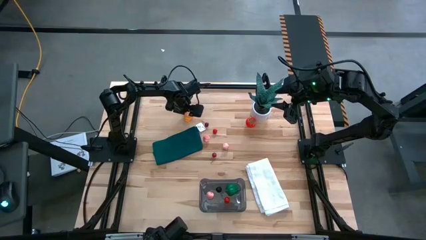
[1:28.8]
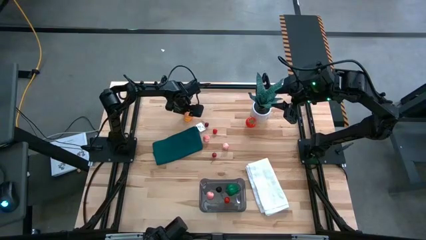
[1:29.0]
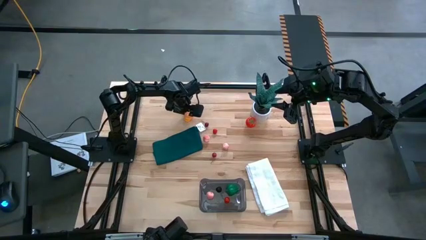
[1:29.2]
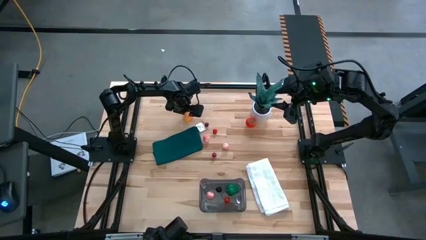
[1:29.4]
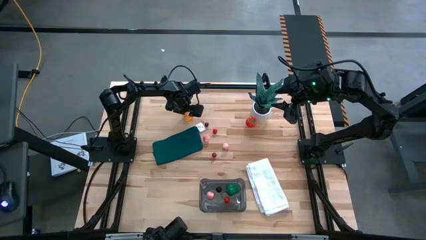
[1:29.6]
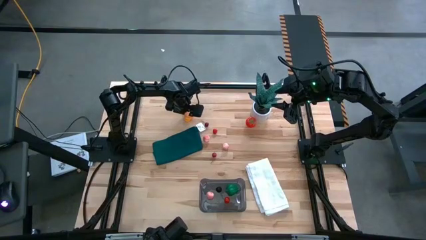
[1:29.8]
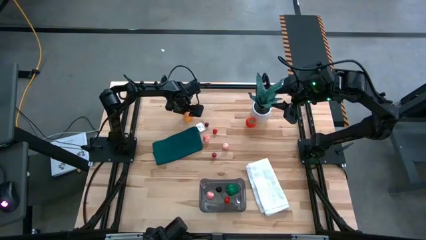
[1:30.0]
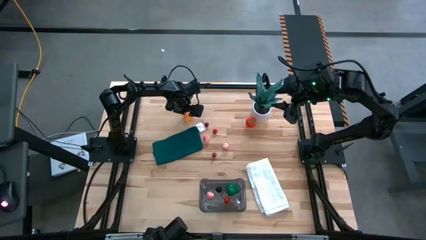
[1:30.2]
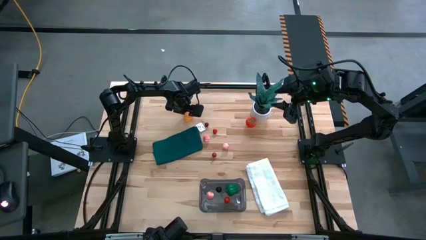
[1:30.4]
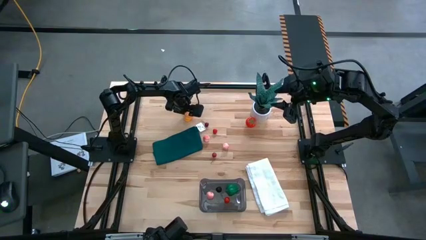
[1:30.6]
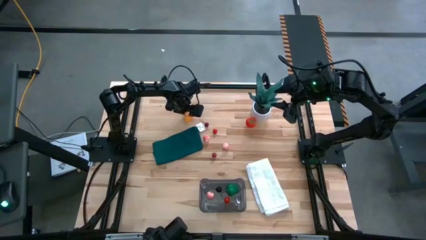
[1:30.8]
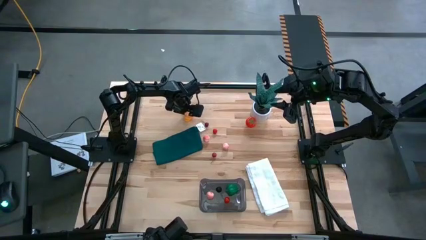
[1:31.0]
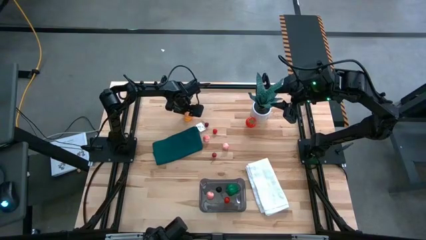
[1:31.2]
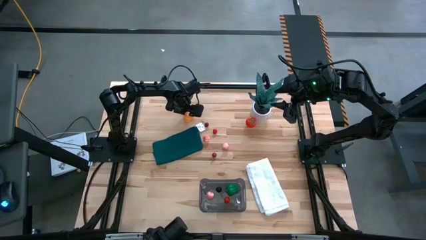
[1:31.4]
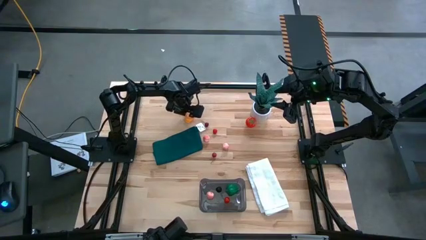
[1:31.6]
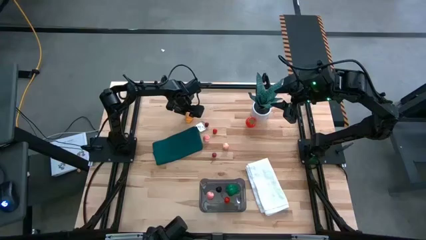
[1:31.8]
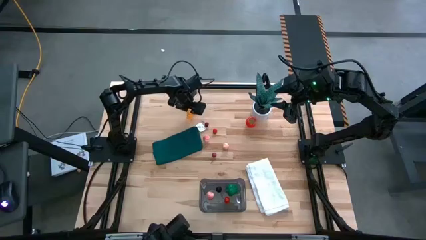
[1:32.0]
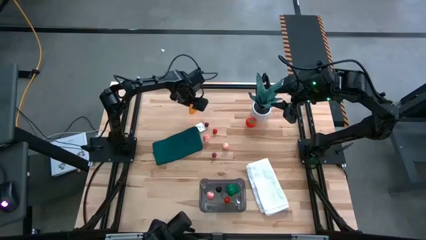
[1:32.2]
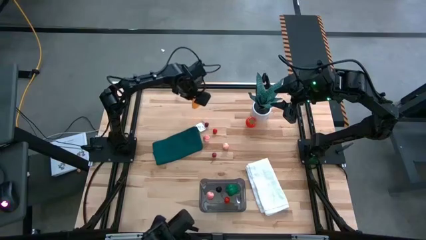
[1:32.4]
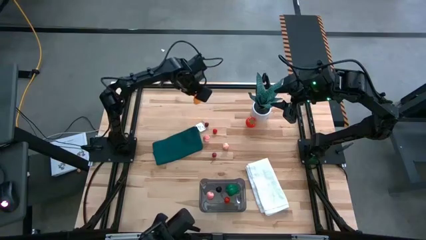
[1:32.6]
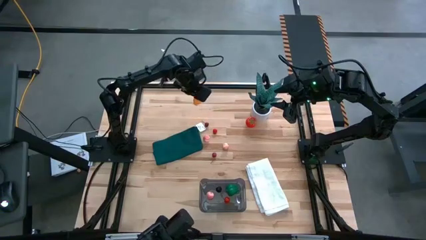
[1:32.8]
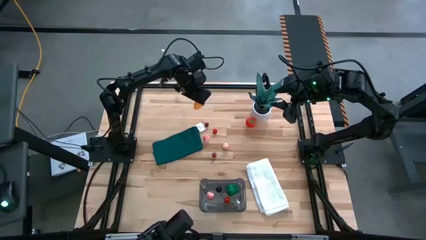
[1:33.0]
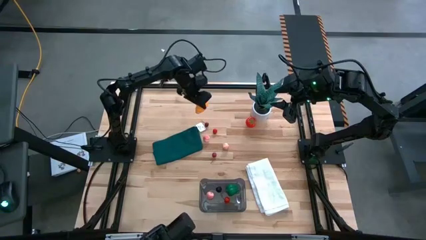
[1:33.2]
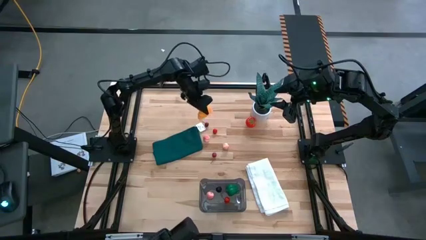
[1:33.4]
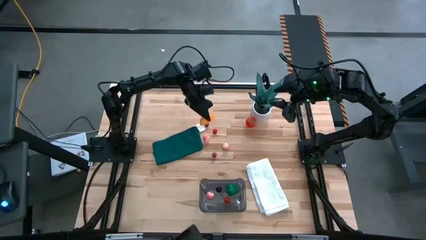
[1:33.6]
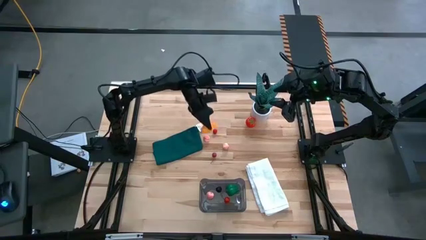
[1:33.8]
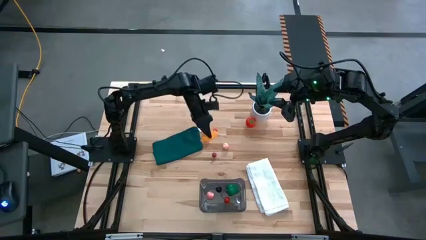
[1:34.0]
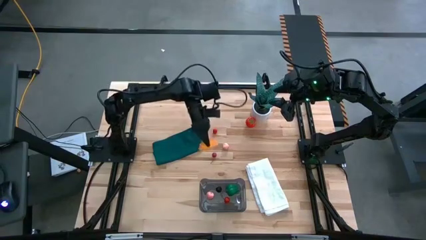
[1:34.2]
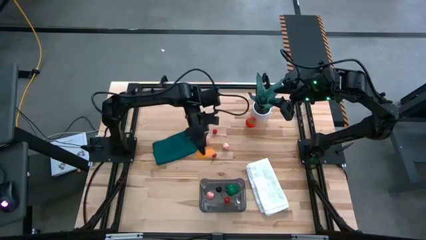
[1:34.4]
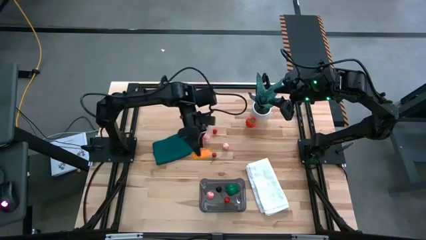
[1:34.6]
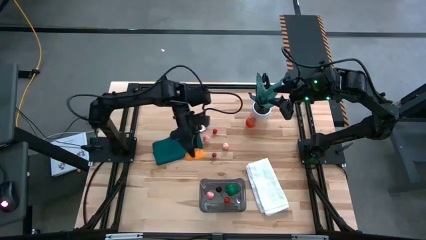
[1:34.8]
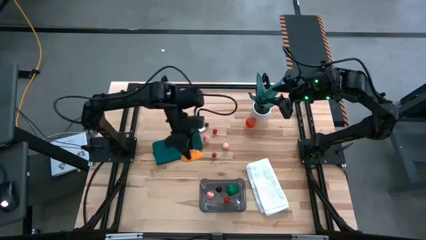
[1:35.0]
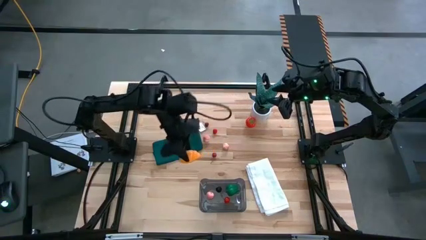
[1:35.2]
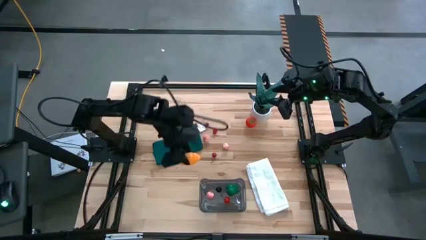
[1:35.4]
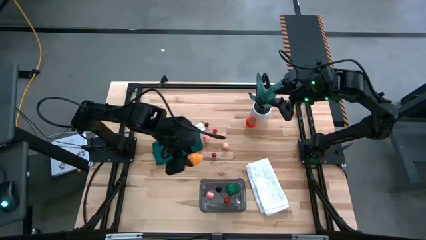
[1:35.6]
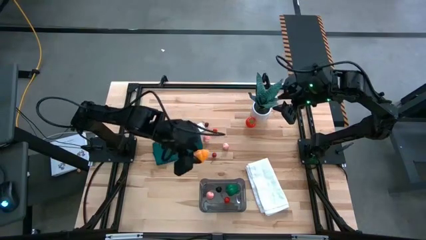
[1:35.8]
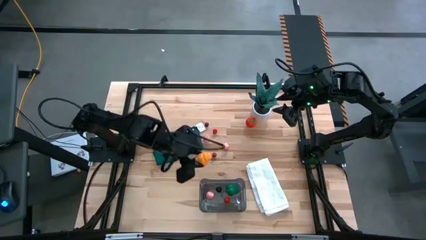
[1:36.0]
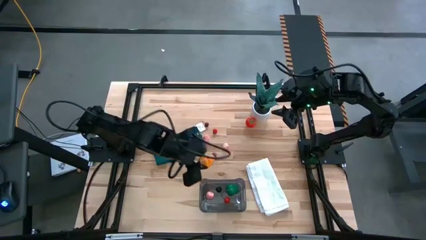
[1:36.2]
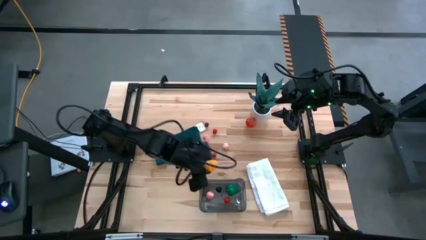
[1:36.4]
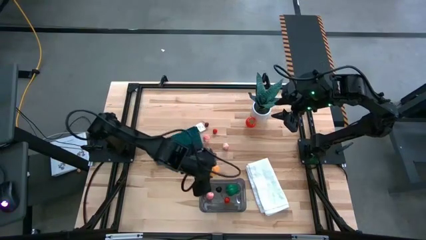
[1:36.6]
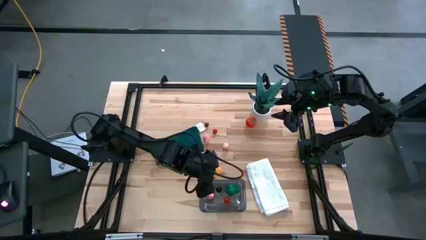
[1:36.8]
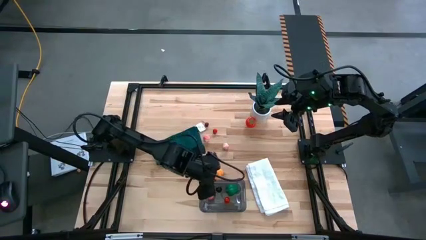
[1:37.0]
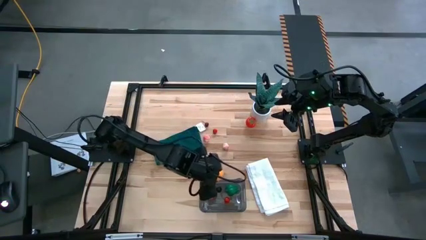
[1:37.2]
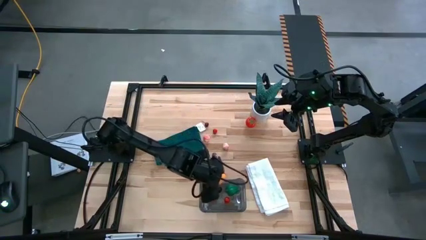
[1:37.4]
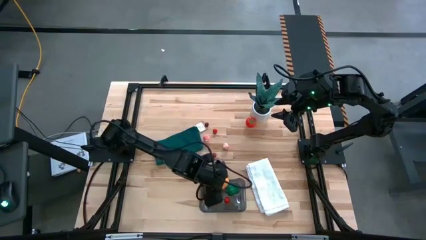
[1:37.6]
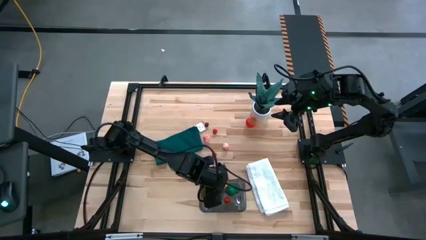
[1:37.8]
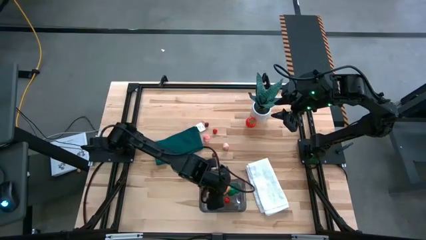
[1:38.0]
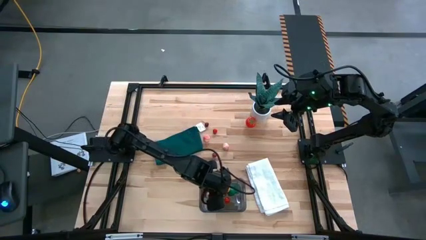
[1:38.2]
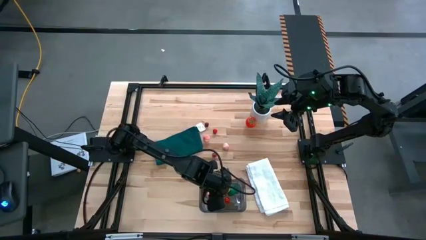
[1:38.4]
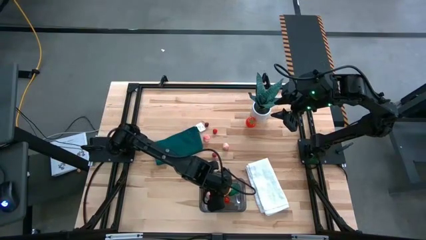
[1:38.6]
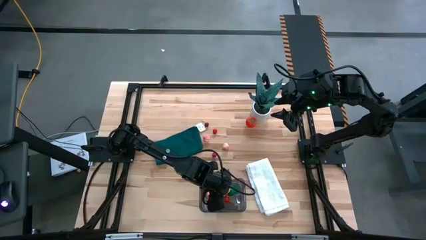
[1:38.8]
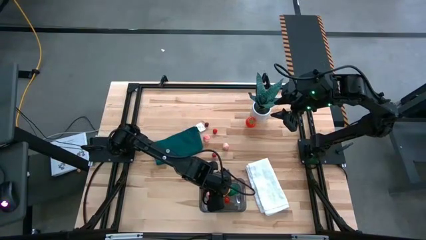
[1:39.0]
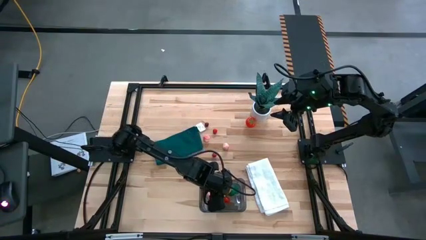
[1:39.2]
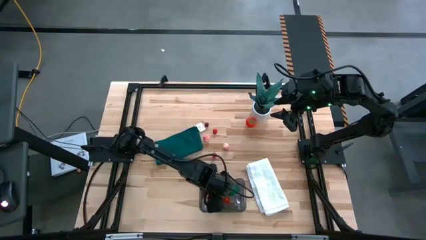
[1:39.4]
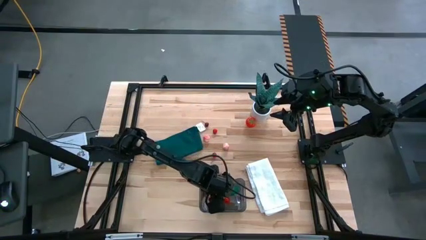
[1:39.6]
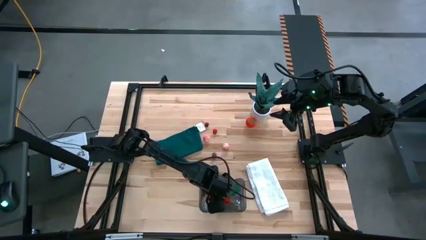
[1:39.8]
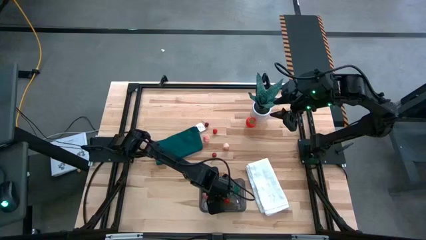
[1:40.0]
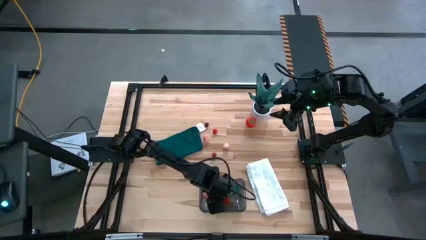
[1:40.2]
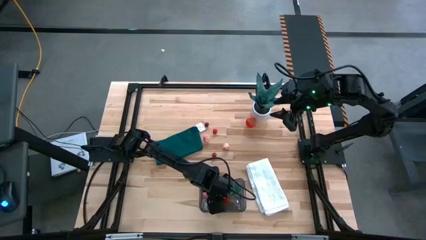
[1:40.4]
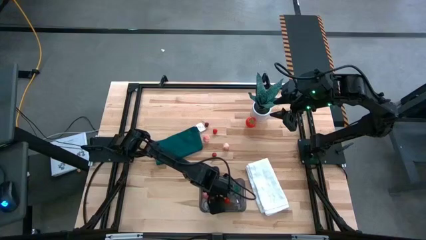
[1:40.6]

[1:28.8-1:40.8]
Task: Pick and placing Produce into tupperware
Put the orange croissant into the black bin

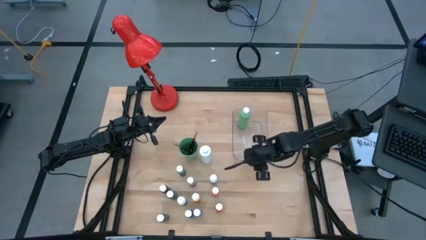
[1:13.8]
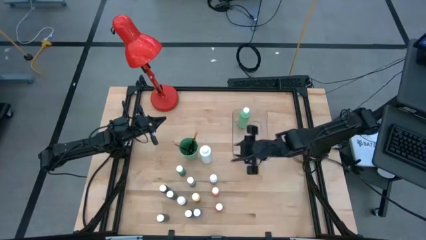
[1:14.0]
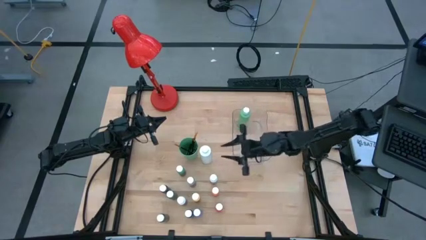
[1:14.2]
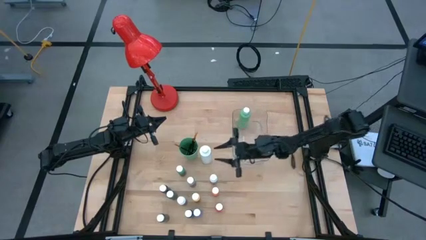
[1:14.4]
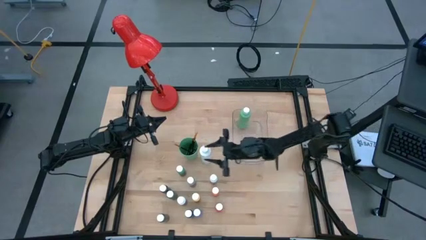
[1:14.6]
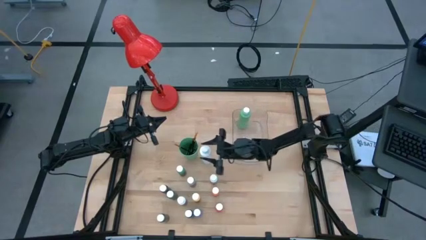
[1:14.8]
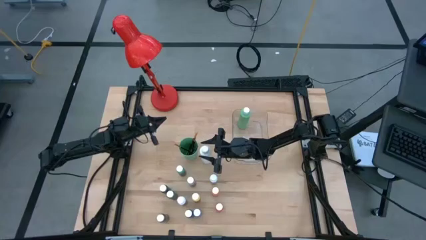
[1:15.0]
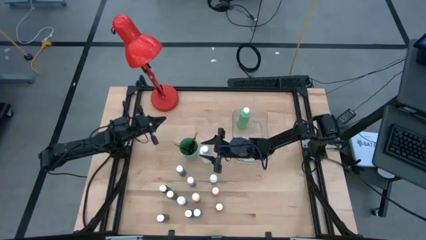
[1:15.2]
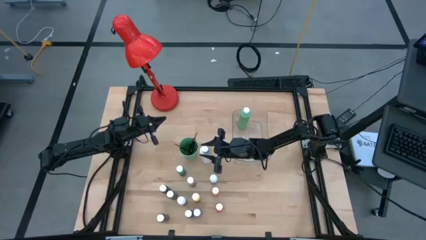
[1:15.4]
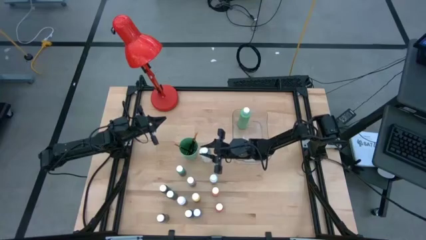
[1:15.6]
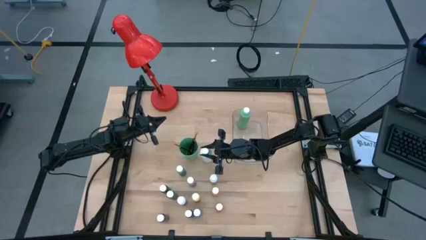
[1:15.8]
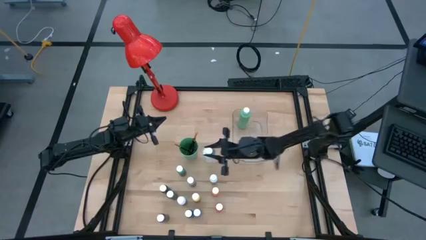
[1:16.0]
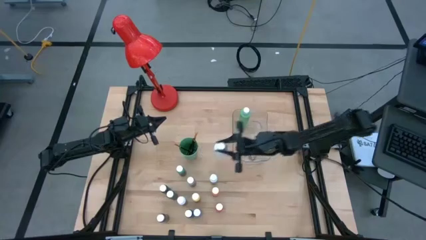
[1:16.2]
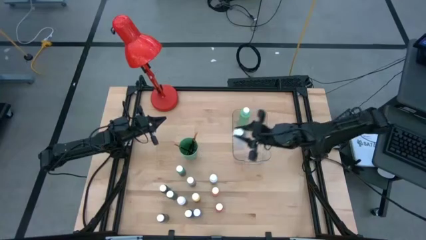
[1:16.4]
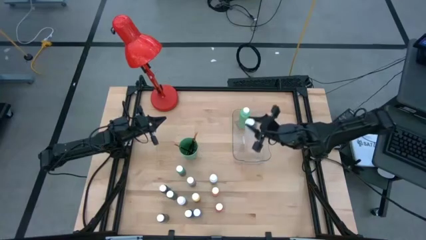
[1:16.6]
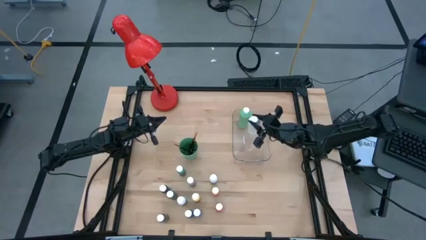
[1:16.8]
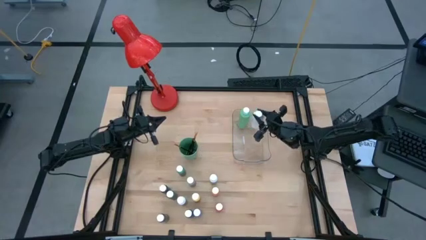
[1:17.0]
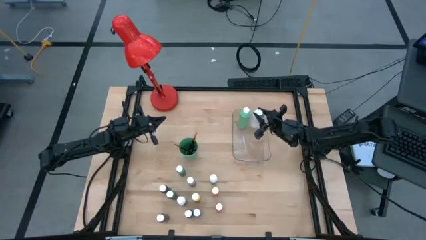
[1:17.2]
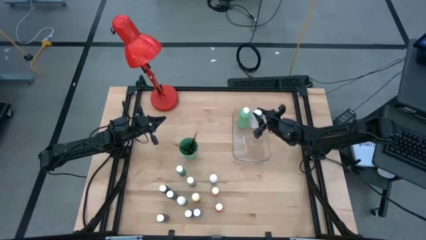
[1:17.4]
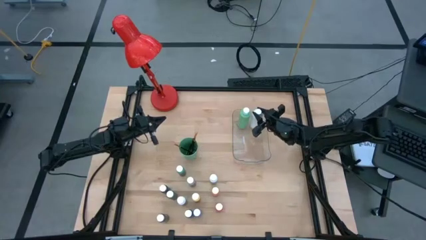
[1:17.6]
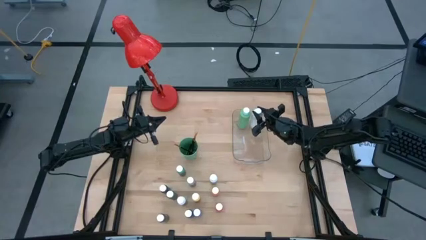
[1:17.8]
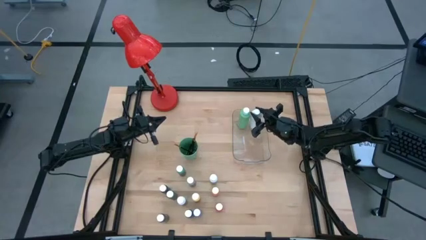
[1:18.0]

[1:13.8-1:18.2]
Task: Pick & Place Paint Supplies
Put the large white paint bottle into the transparent bin
